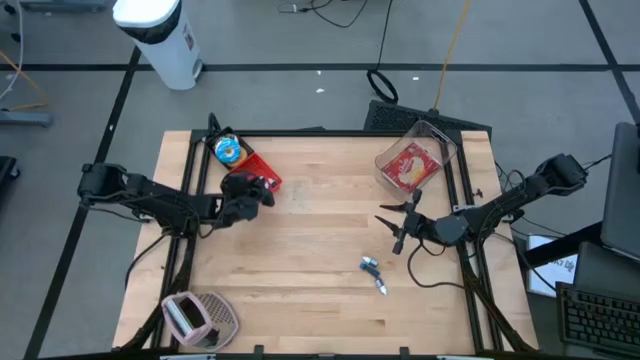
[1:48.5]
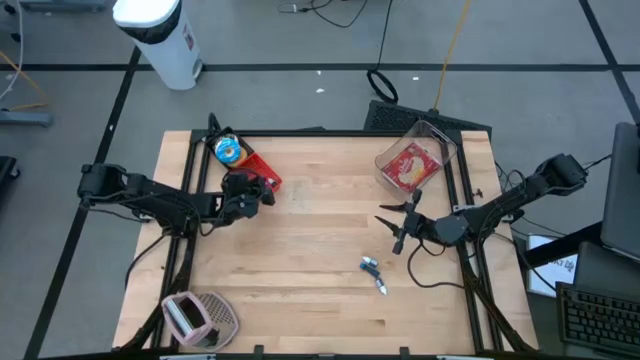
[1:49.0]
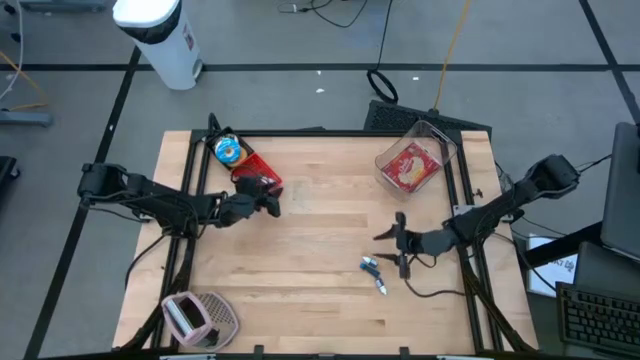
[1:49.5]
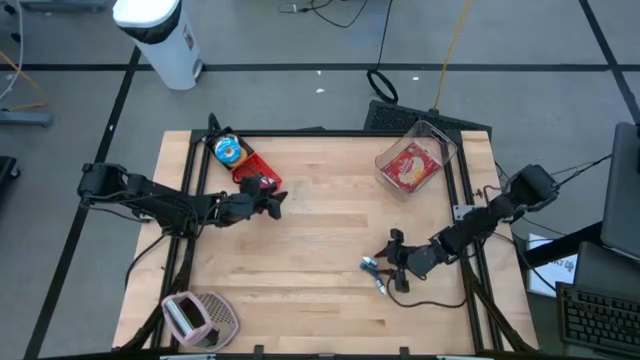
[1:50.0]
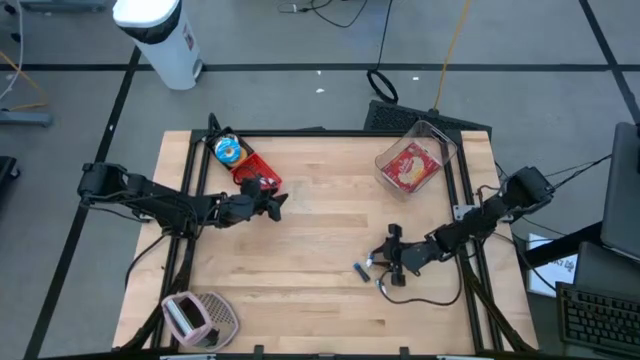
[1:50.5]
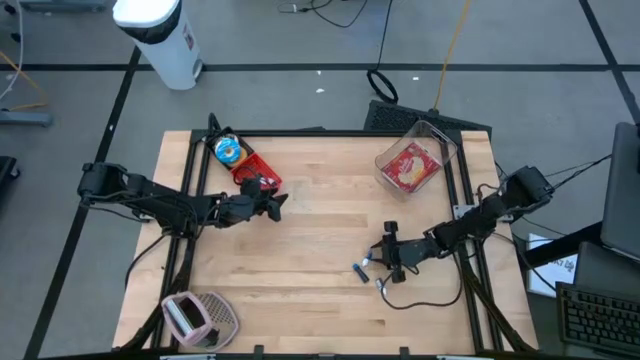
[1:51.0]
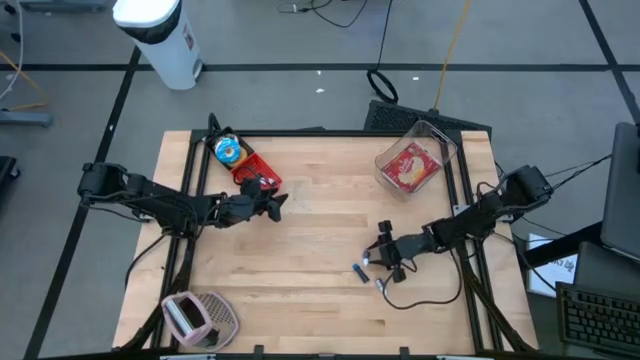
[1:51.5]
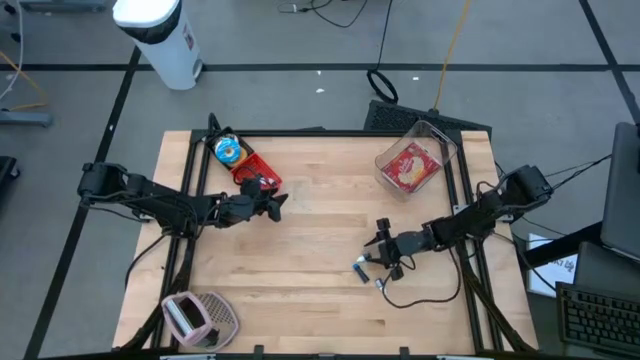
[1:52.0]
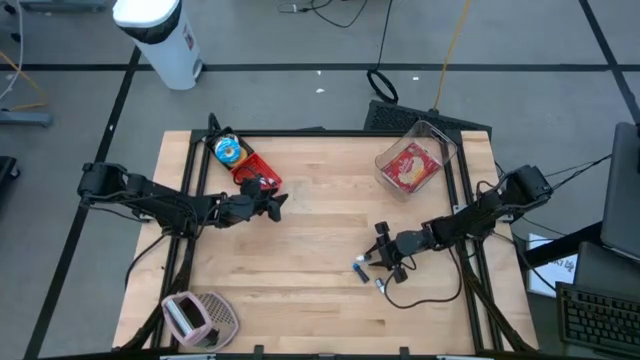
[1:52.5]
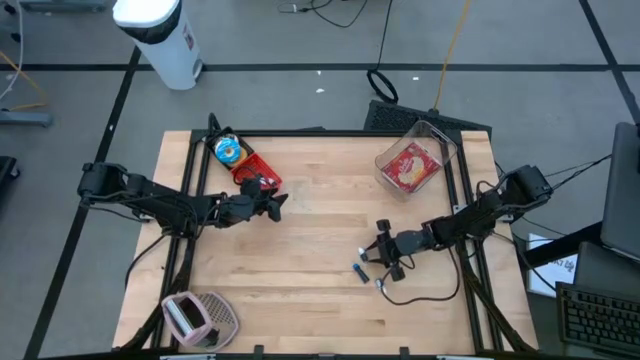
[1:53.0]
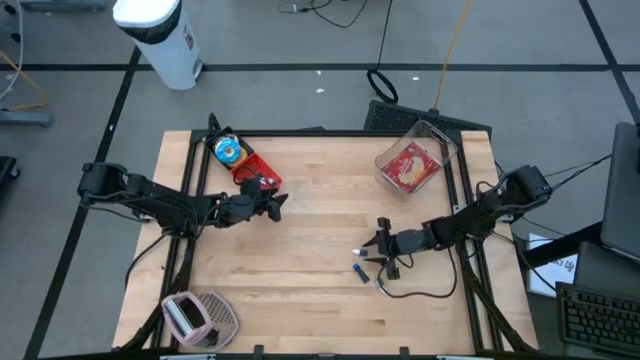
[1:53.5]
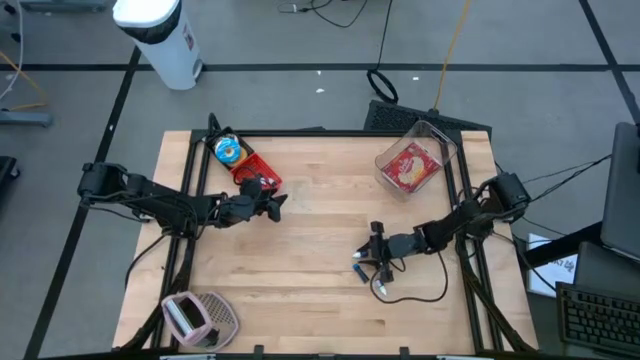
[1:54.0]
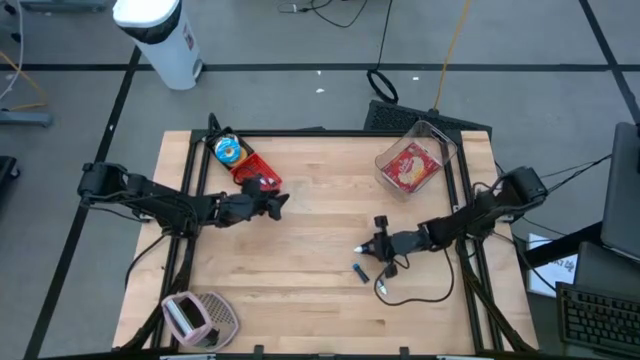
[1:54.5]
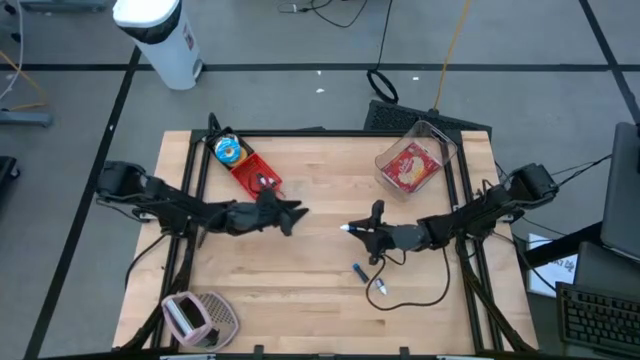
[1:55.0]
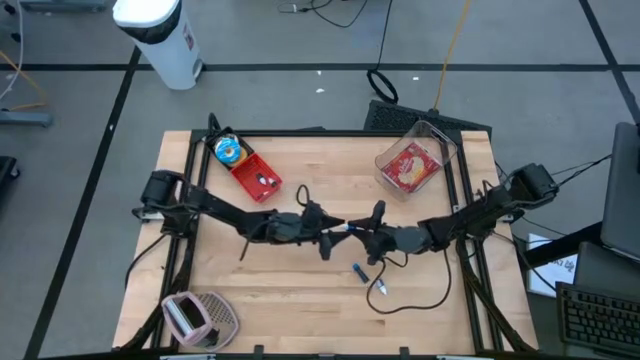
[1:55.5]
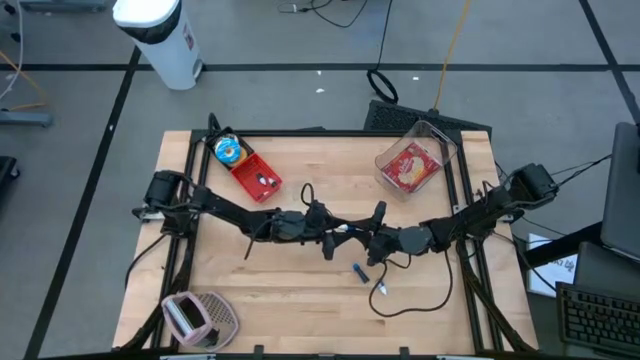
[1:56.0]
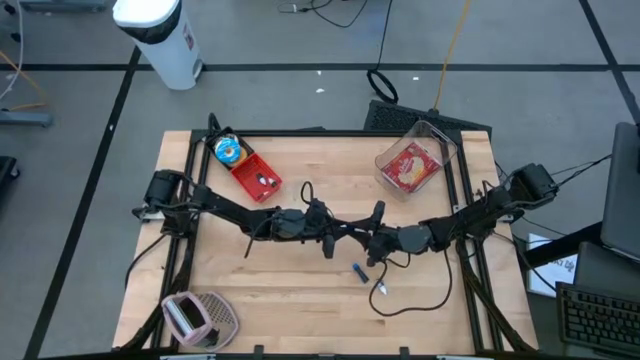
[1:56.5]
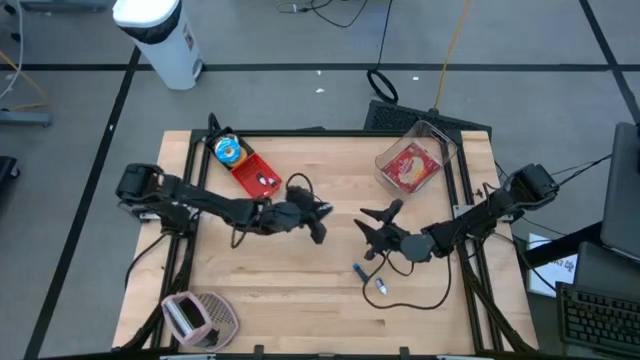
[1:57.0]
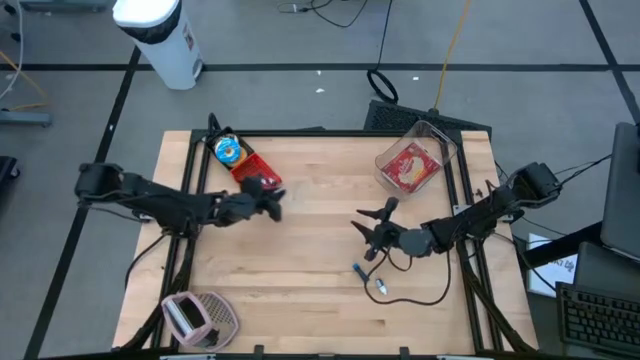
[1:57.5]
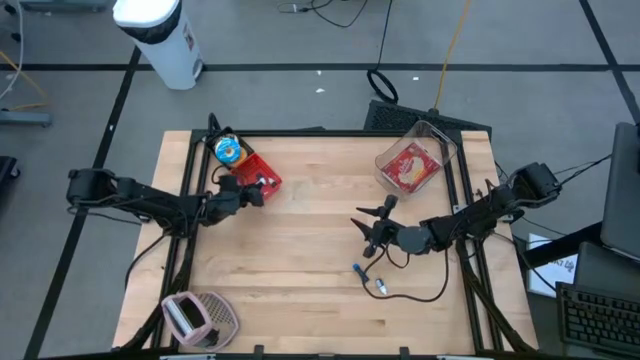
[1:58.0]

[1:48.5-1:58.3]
Put the dark blue food coloring bottle into the red bin

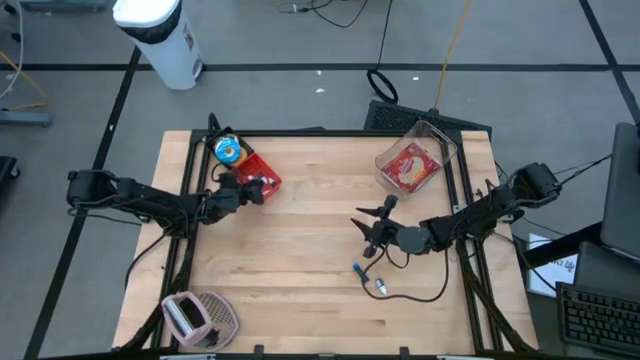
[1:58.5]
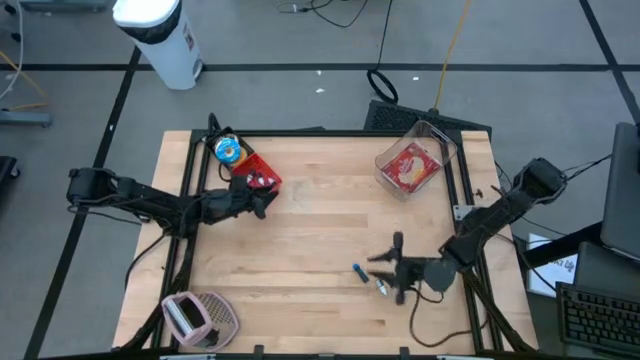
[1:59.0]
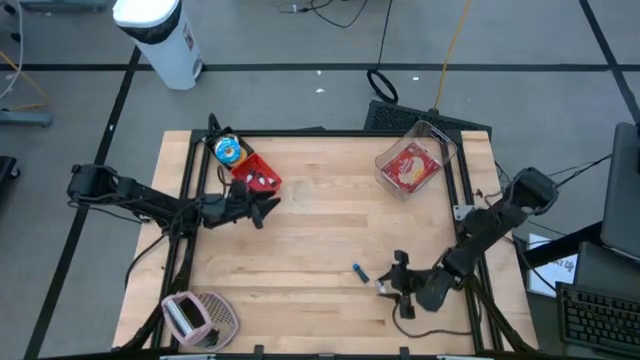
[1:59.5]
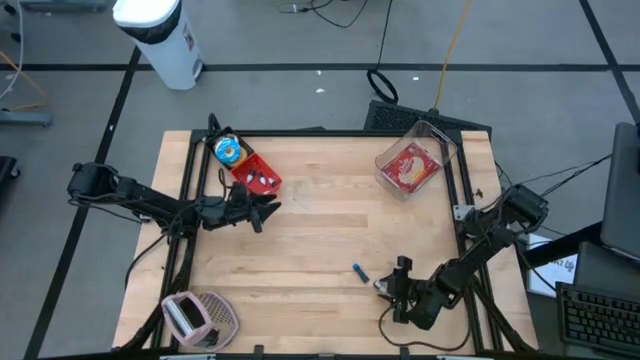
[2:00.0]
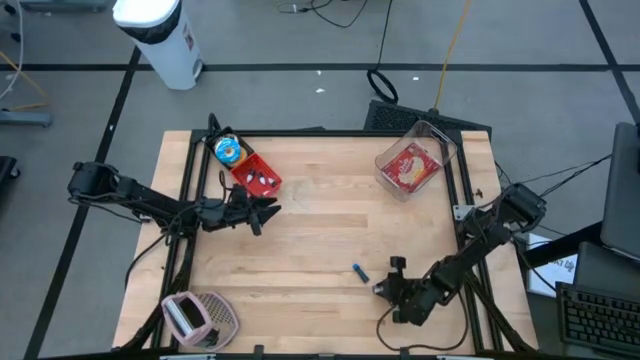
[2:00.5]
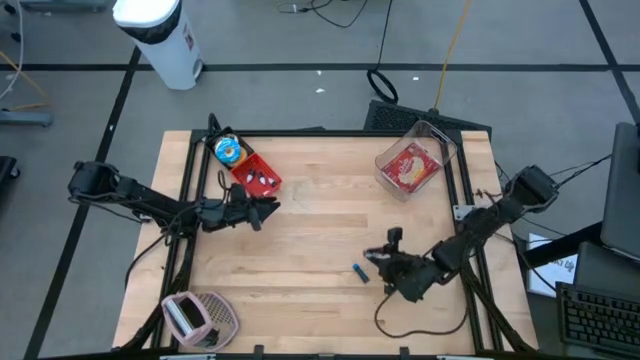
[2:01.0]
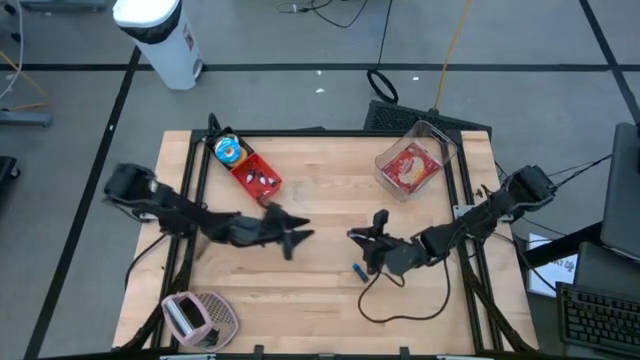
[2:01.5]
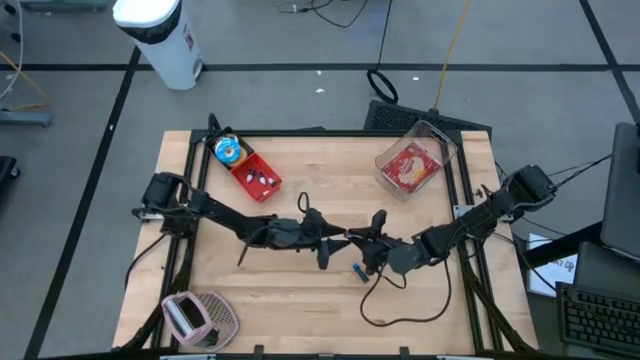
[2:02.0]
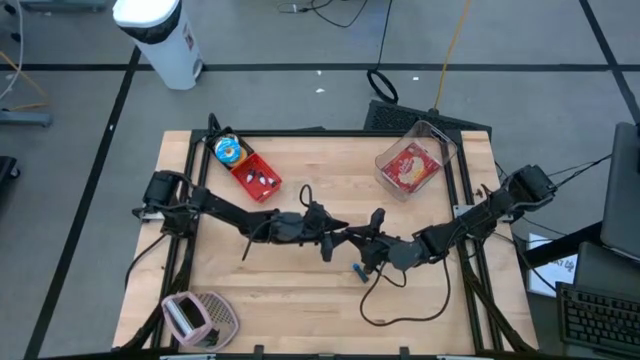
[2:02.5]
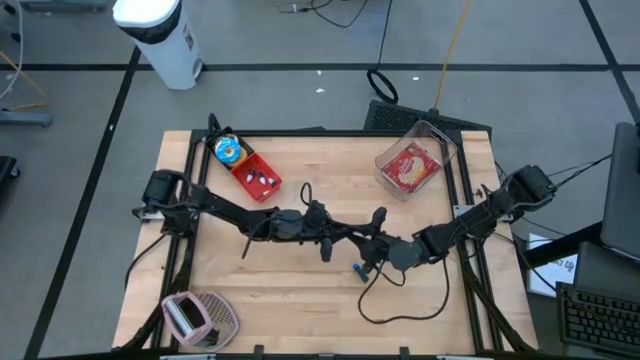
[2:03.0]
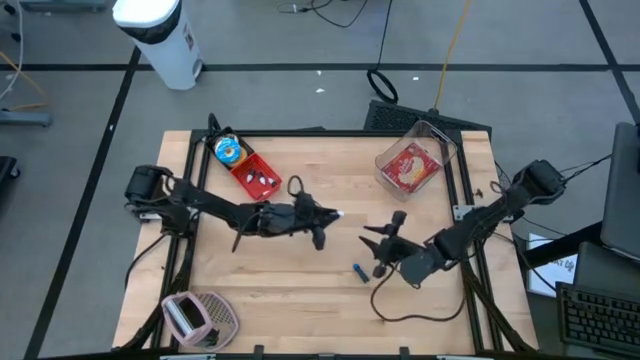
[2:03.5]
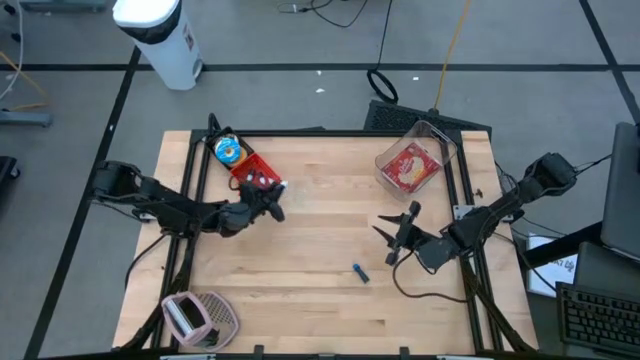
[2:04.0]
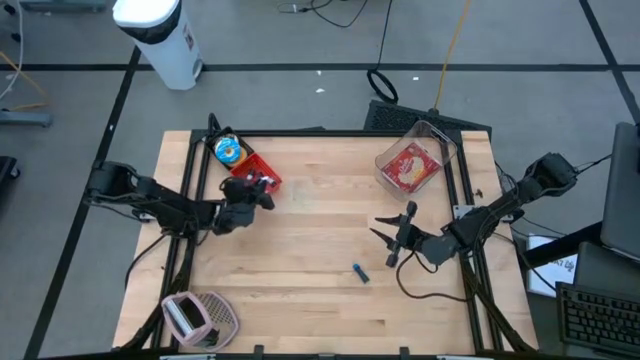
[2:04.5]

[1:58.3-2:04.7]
Put the purple food coloring bottle into the red bin

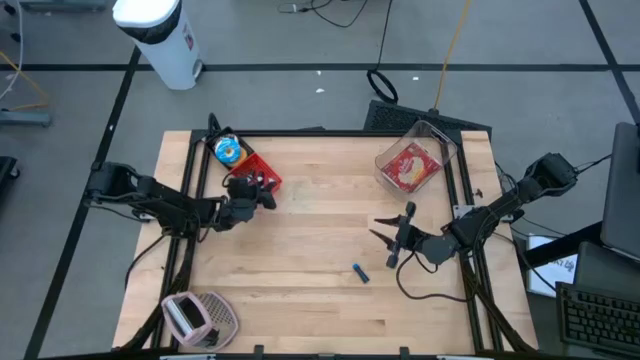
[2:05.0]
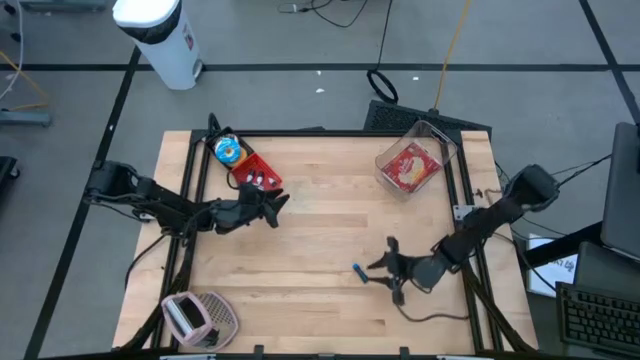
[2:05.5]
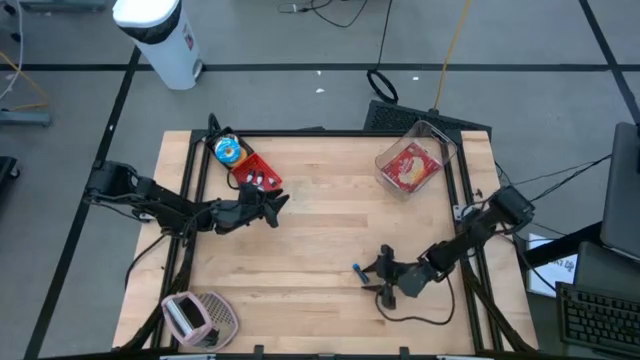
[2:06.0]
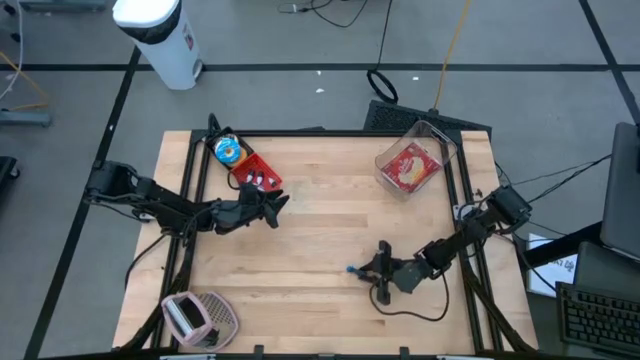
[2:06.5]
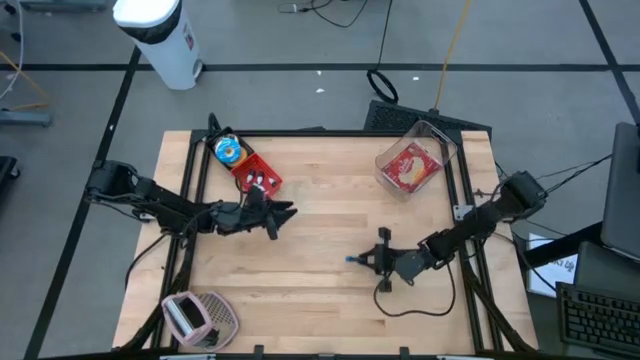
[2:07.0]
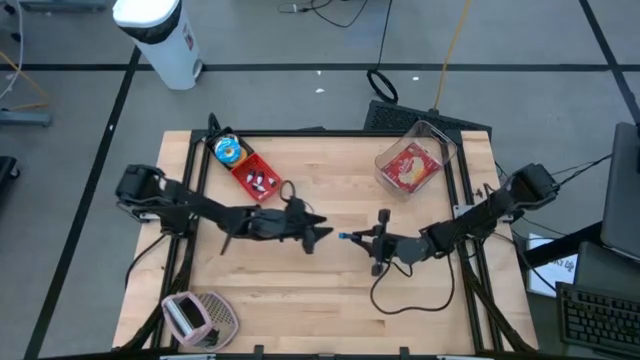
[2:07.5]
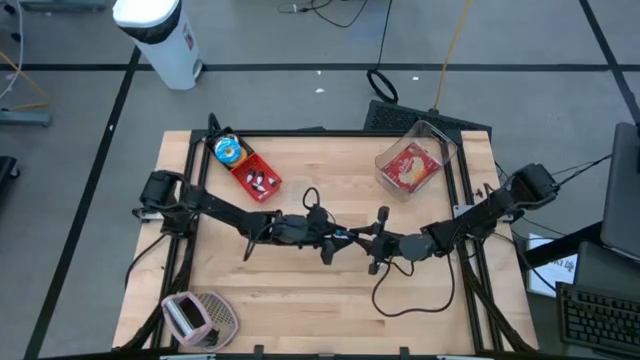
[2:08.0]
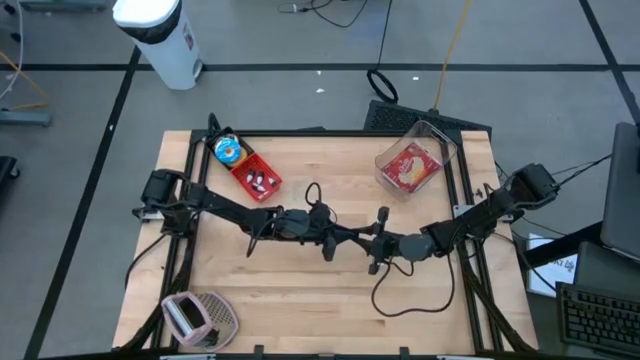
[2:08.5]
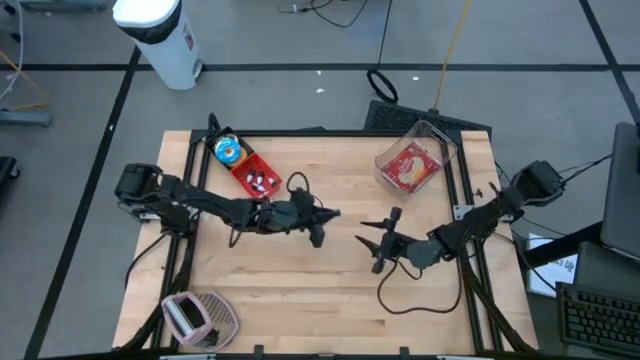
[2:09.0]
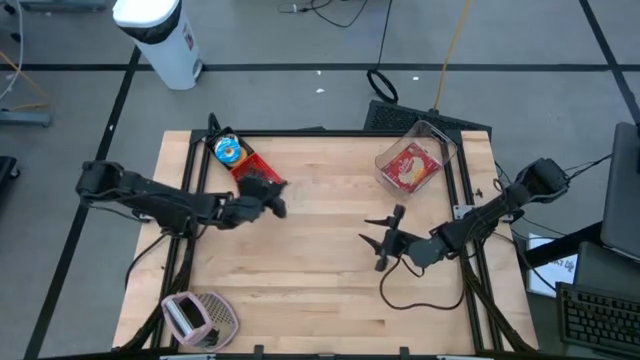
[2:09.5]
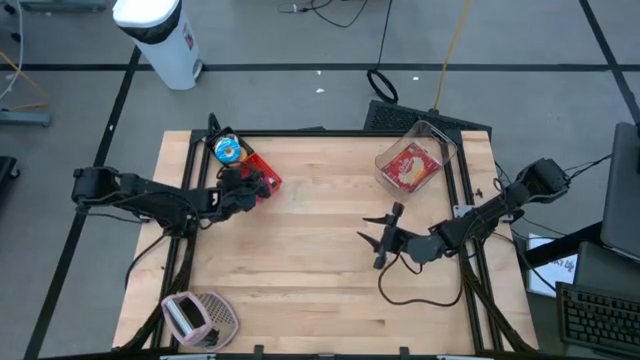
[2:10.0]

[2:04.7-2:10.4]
Put the blue food coloring bottle into the red bin
